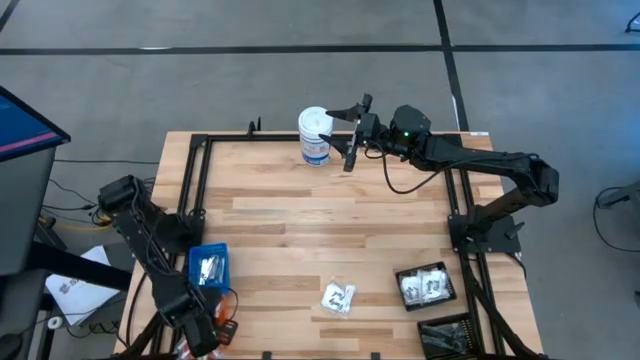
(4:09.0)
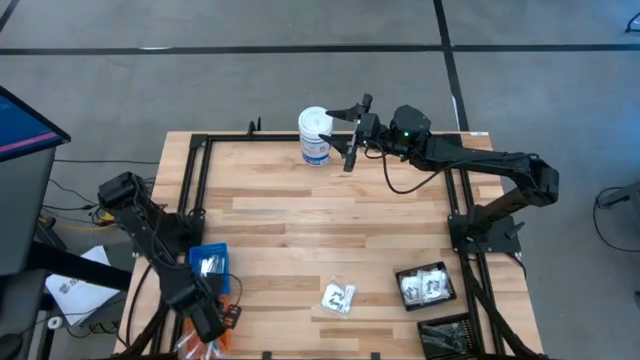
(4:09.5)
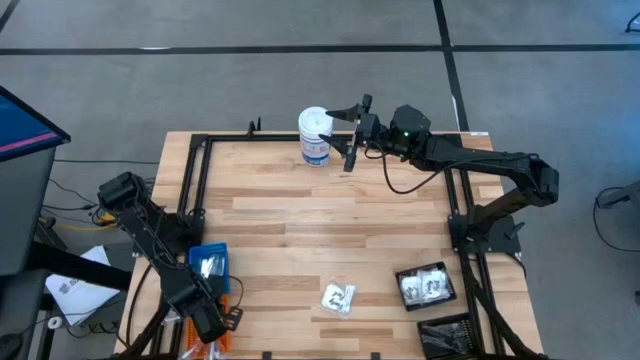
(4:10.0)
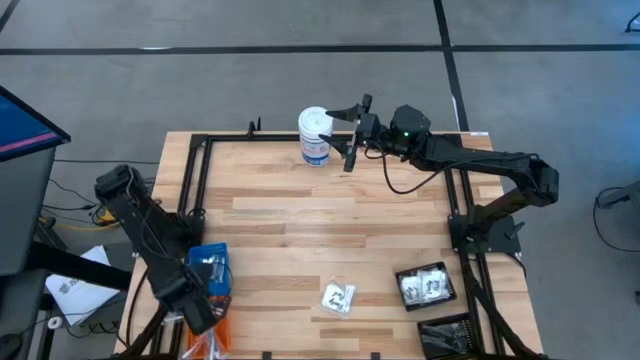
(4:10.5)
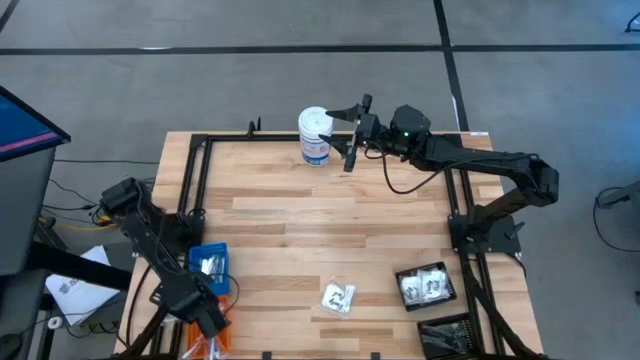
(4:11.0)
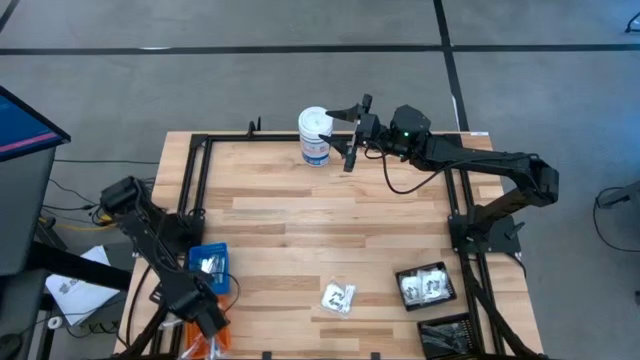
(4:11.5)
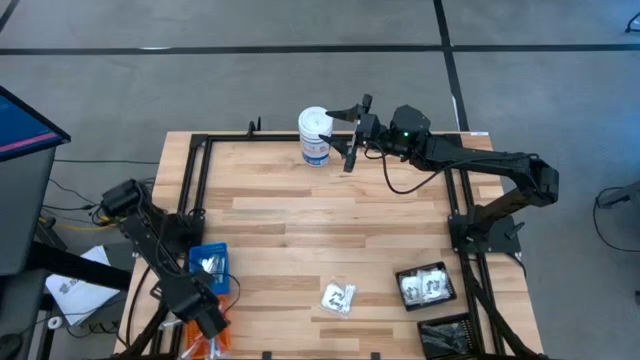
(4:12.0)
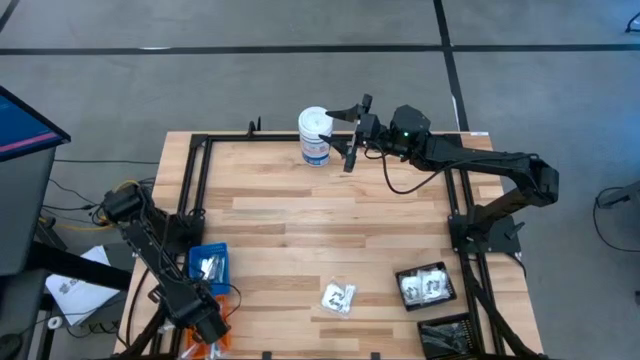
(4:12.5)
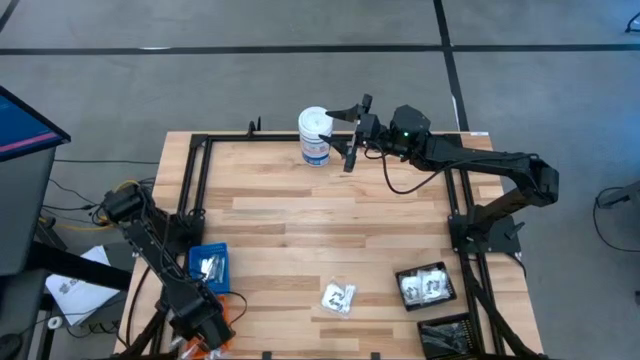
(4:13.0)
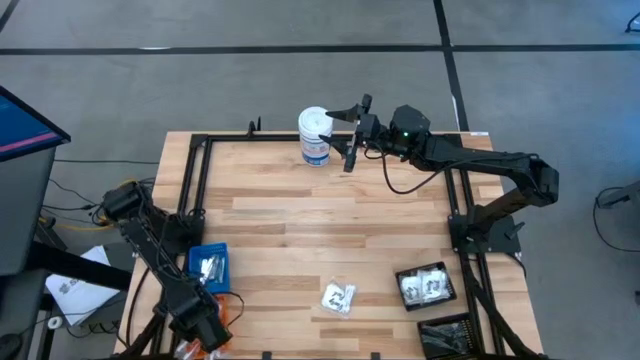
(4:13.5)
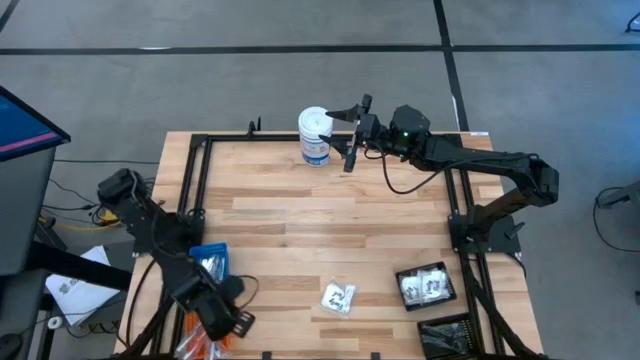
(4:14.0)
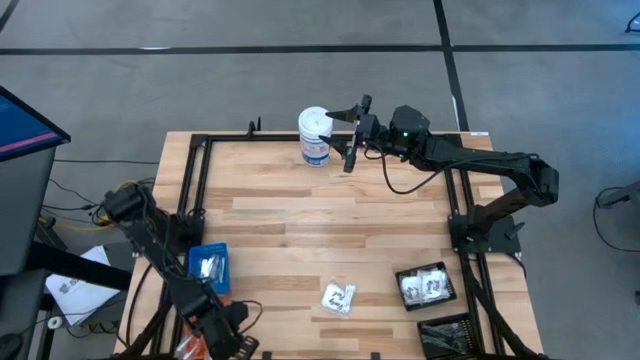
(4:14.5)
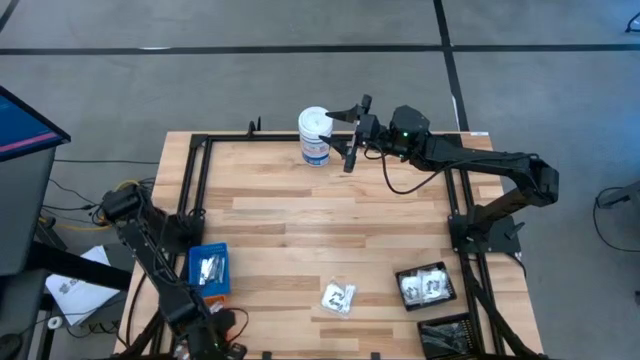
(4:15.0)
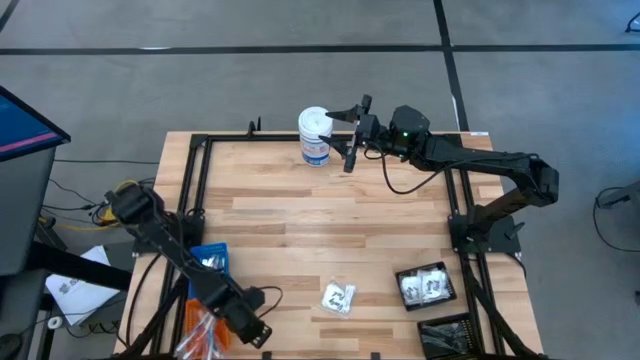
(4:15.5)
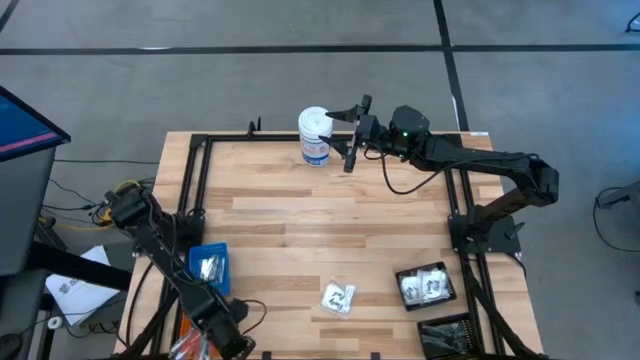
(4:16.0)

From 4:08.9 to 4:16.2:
Task: Pick & Place Travel size toiletries
Adjust the colored toothbrushes in the orange bin

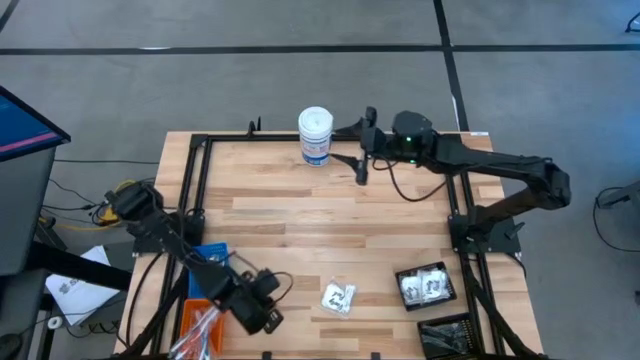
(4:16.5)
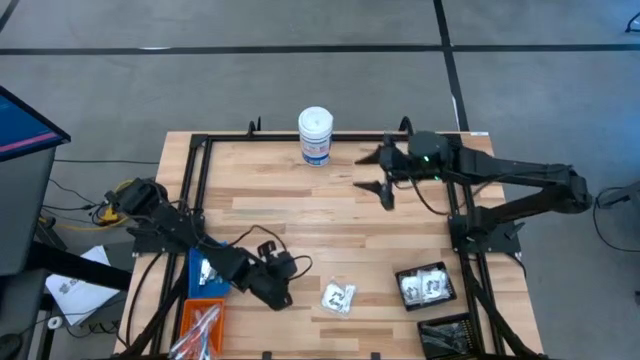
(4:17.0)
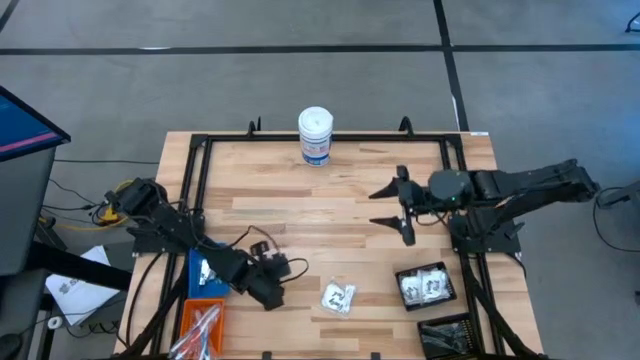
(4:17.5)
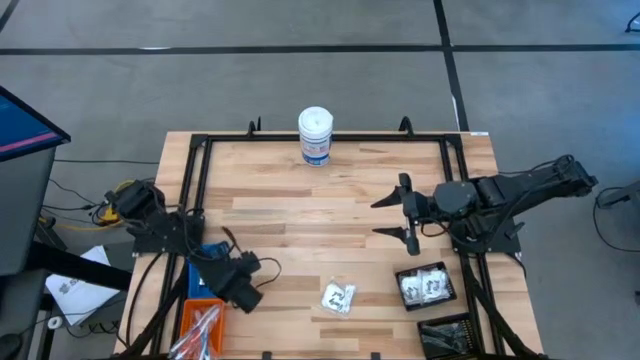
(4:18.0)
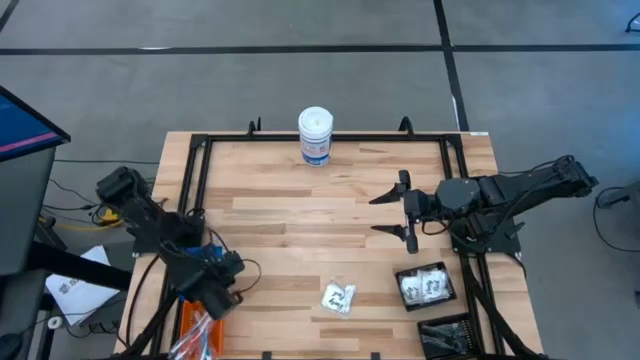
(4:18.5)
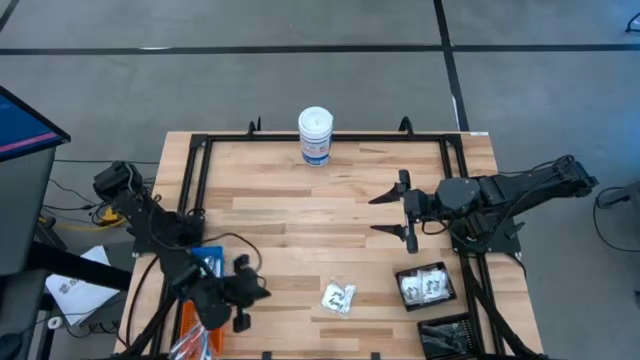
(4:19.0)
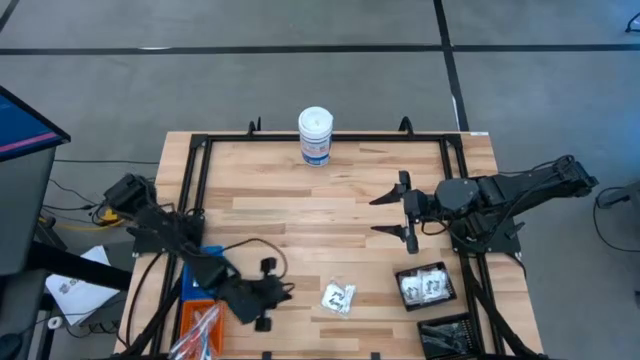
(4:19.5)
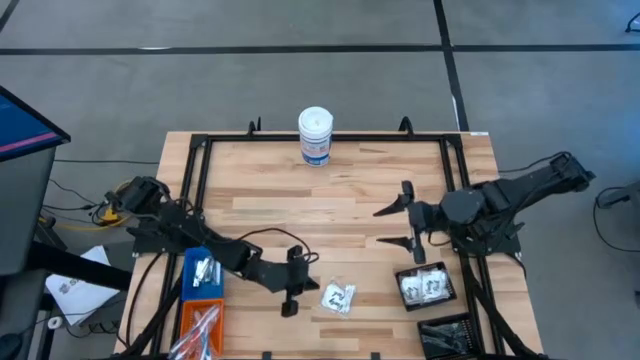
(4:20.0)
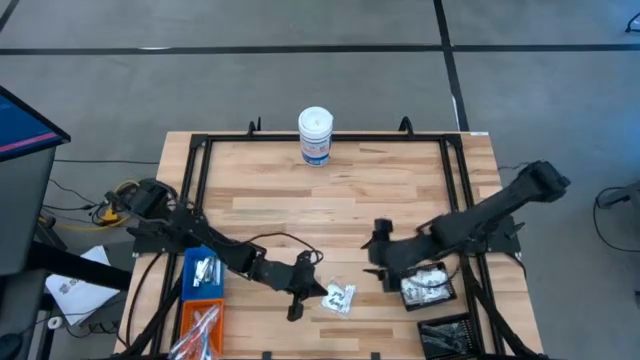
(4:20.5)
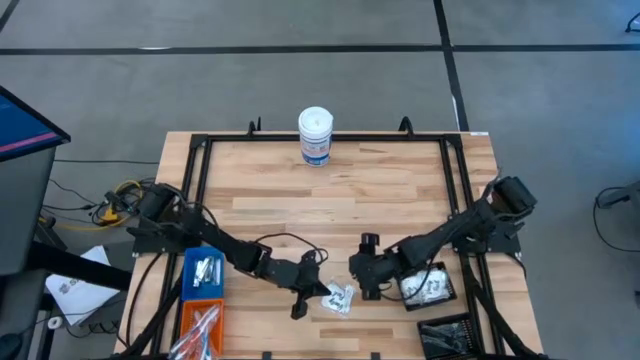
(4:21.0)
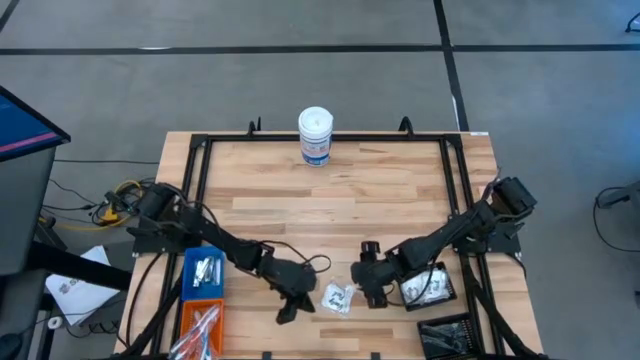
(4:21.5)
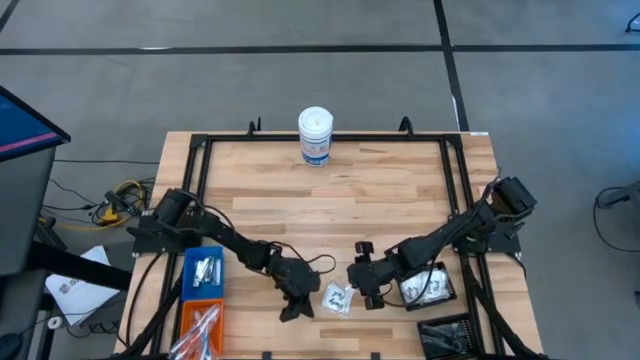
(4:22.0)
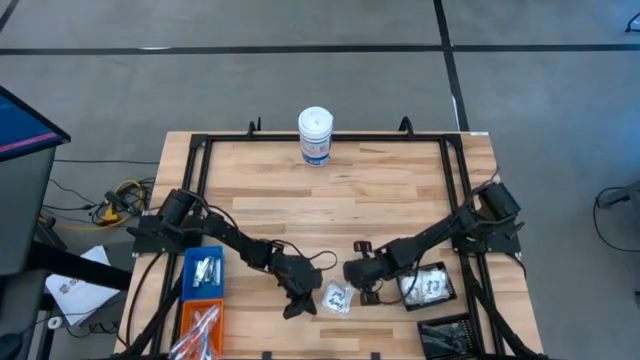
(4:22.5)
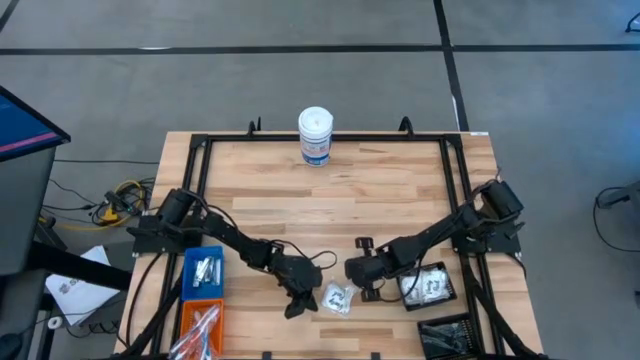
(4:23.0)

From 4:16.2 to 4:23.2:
Put the white cotton swab pack into the top black bin

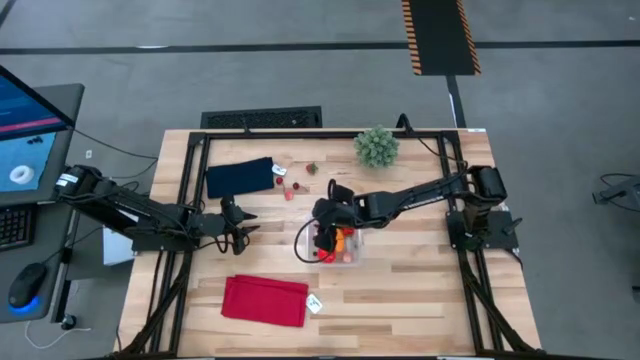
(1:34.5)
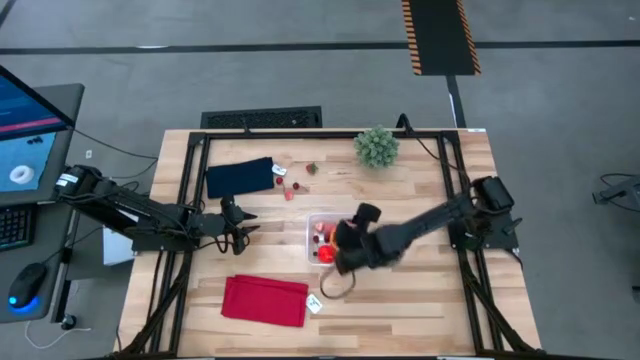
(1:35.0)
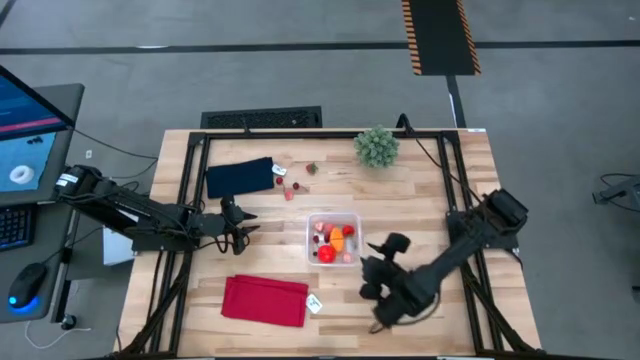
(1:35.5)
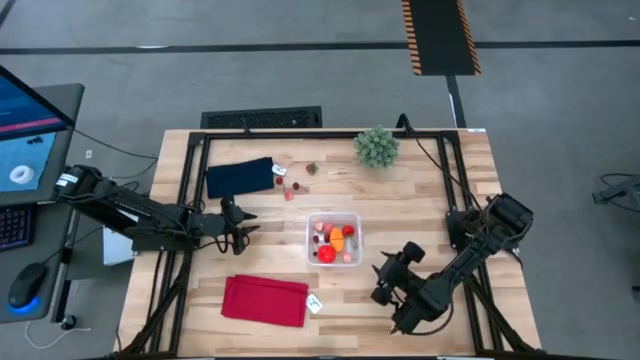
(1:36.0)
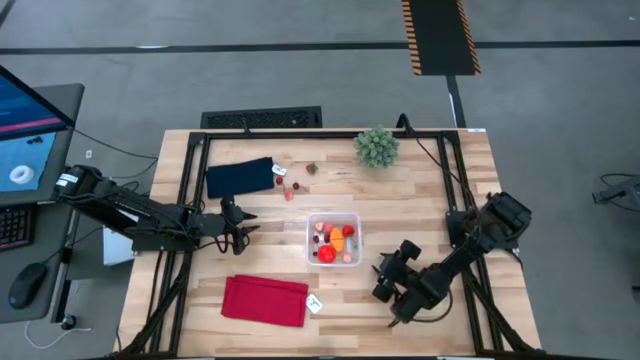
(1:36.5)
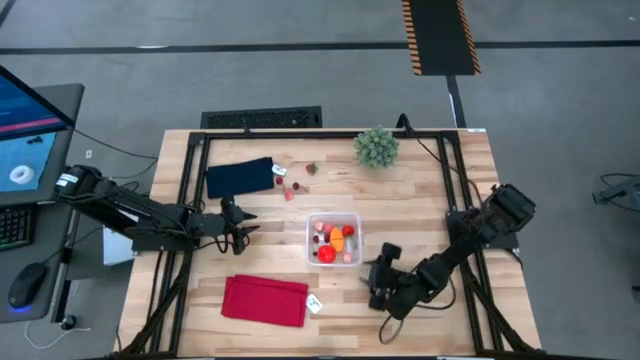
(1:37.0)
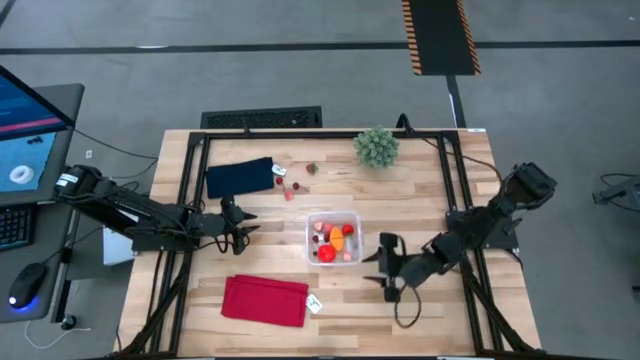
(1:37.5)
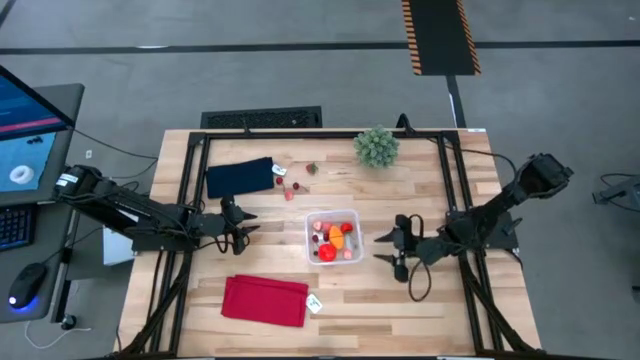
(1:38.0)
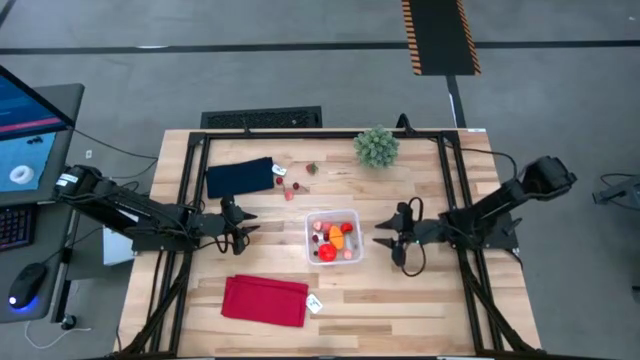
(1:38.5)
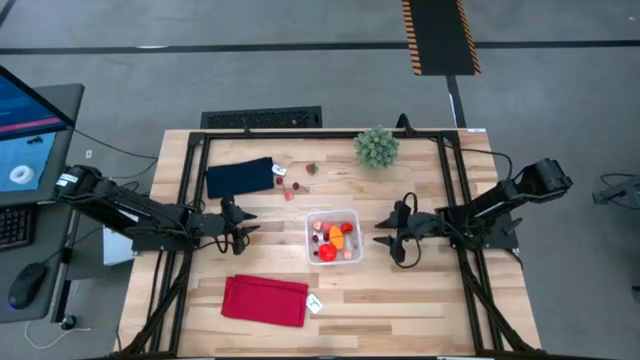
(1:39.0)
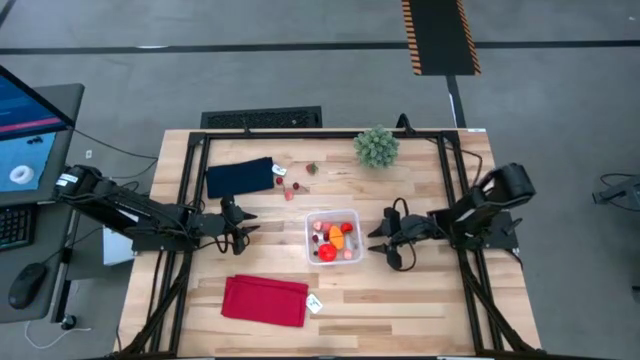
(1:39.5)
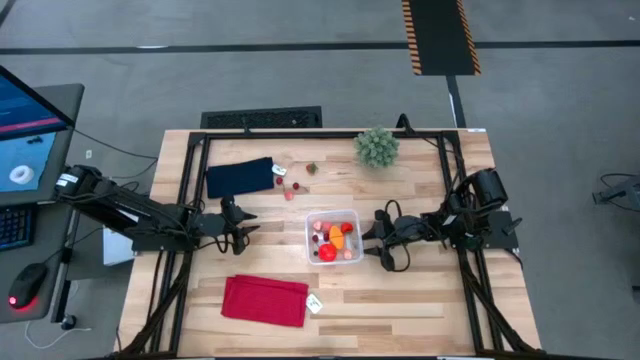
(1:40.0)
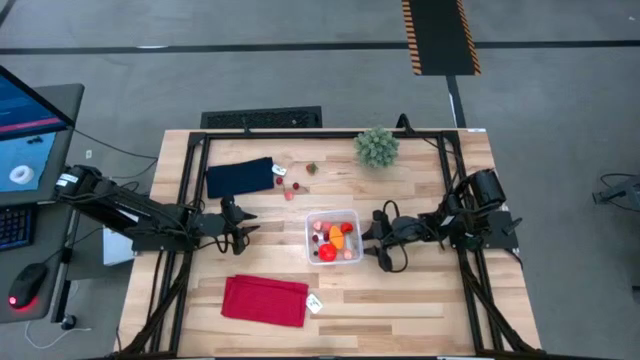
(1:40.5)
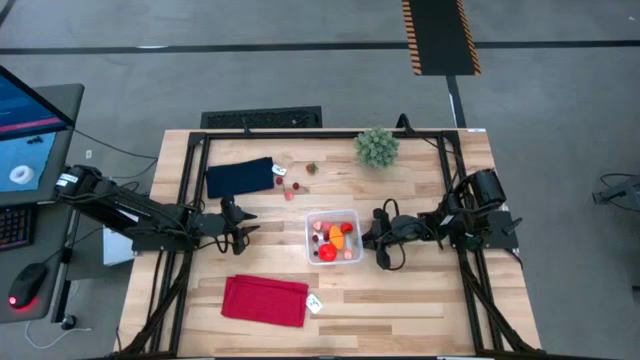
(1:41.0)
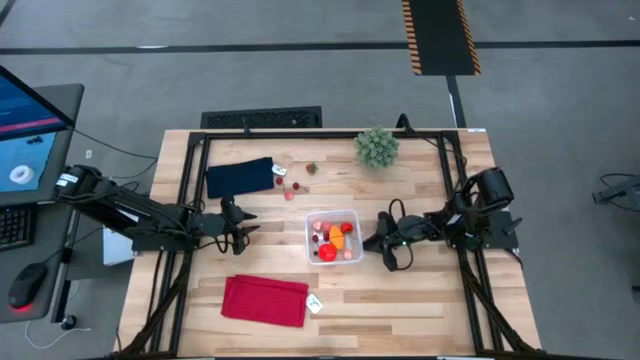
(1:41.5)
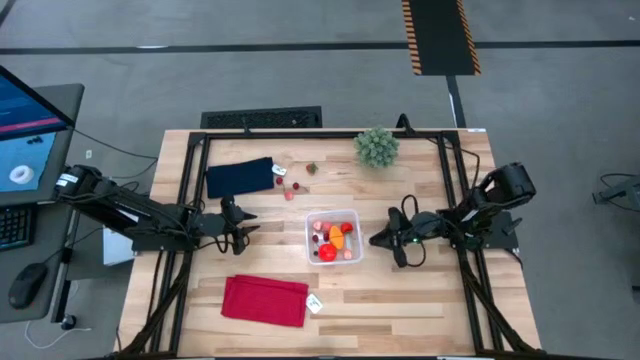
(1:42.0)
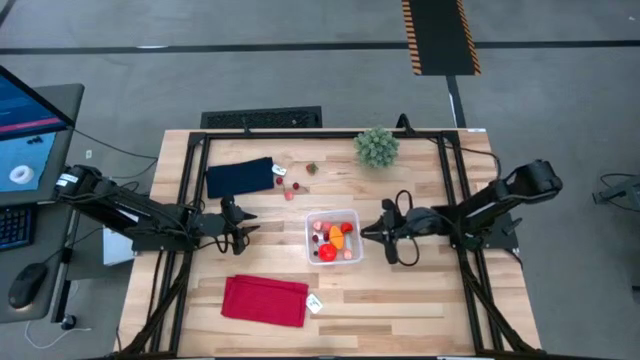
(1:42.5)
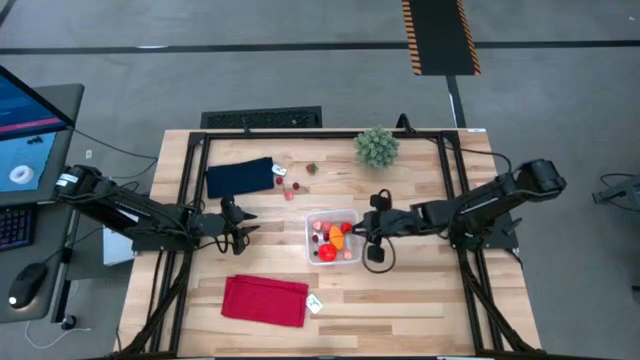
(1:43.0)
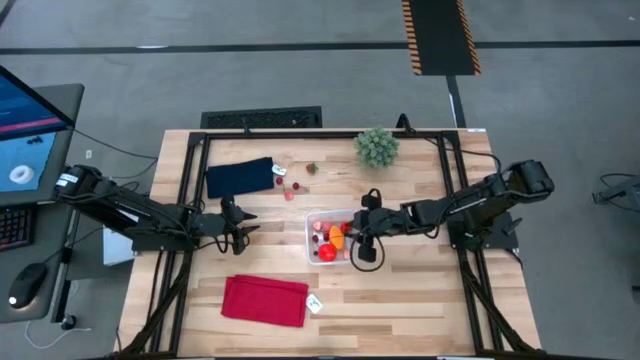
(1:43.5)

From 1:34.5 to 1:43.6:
Task: Pick and placing Produce into tupperware
Put the blueberry into the transparent bin
